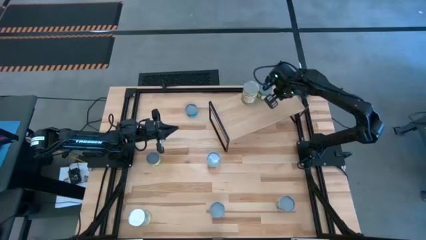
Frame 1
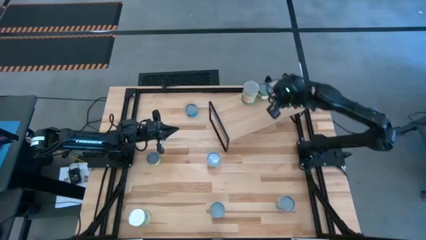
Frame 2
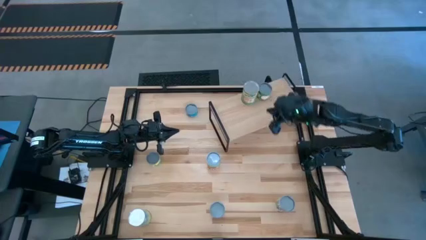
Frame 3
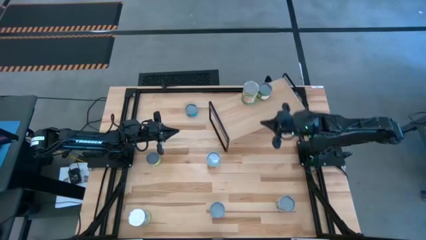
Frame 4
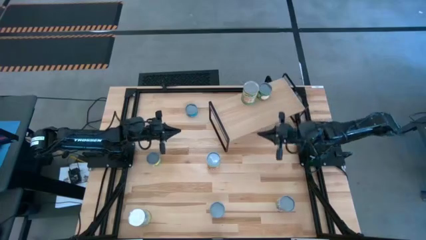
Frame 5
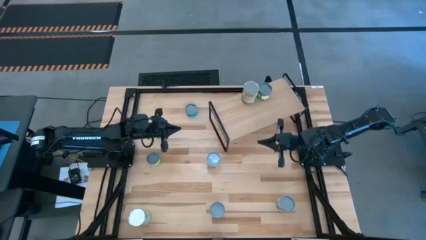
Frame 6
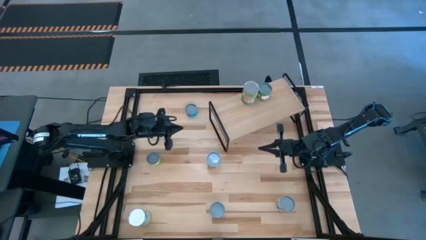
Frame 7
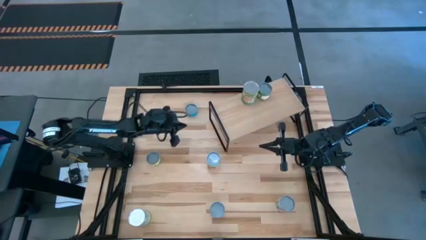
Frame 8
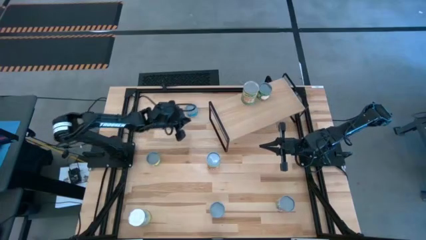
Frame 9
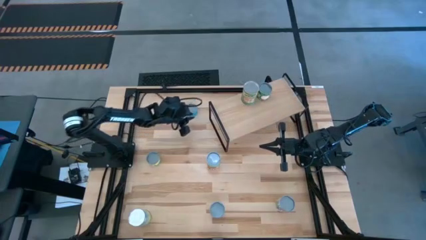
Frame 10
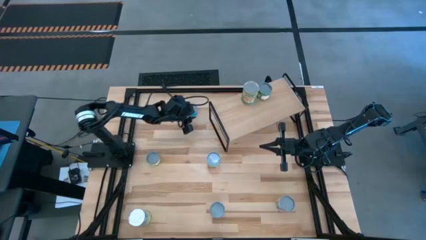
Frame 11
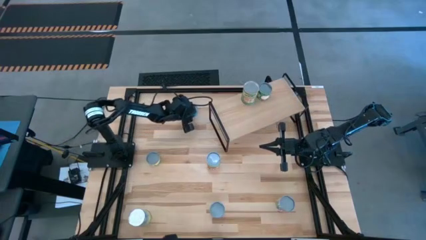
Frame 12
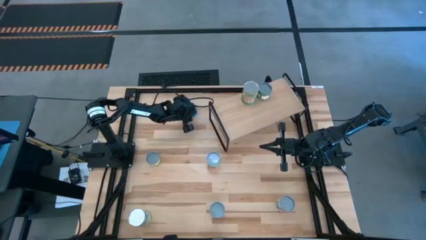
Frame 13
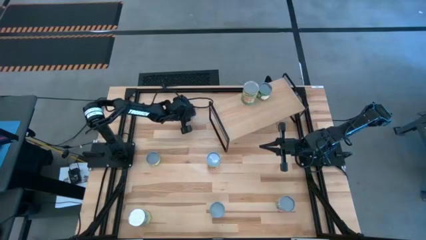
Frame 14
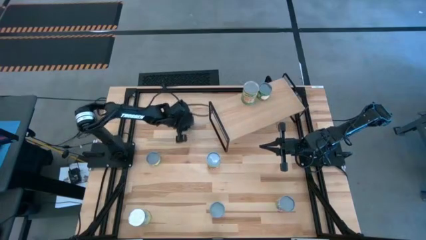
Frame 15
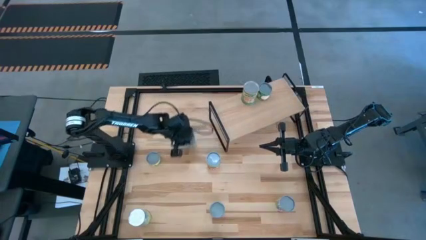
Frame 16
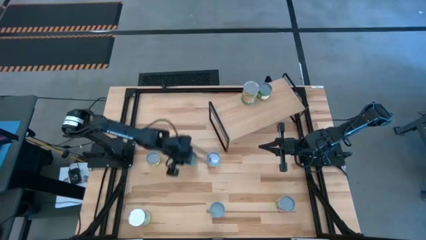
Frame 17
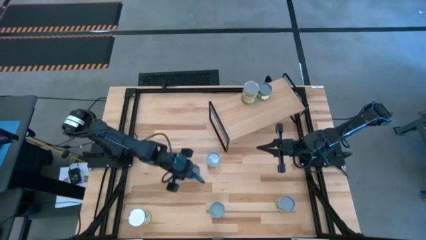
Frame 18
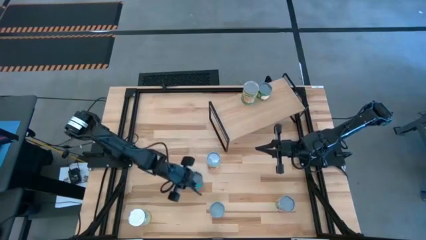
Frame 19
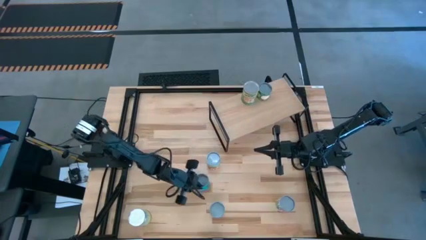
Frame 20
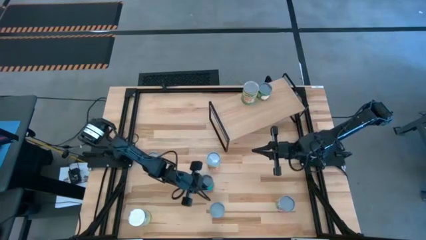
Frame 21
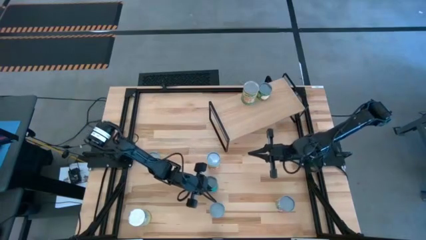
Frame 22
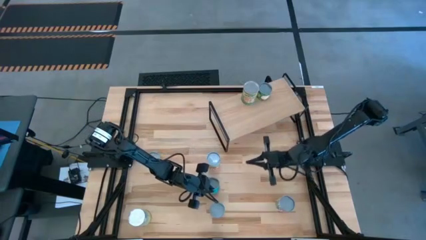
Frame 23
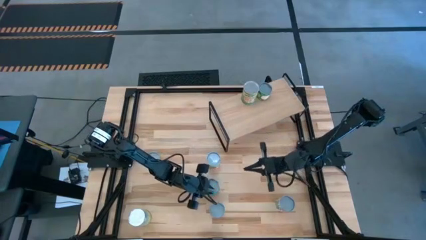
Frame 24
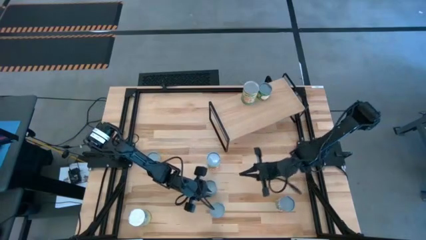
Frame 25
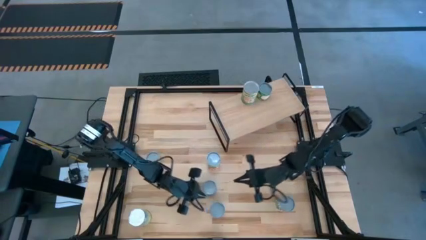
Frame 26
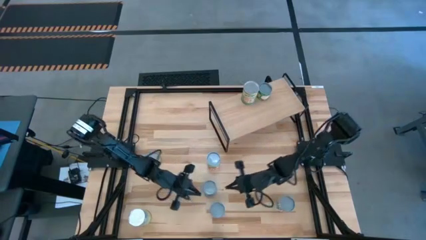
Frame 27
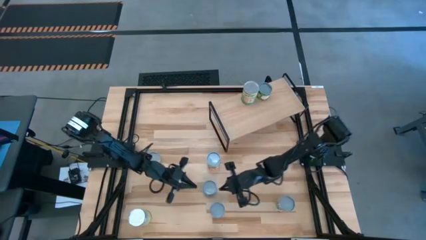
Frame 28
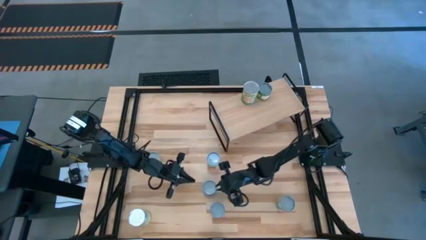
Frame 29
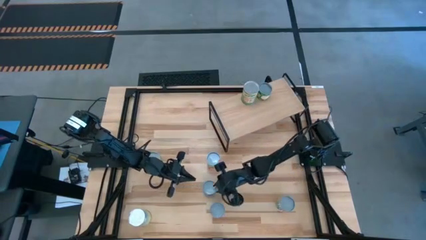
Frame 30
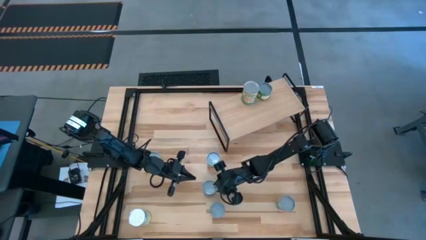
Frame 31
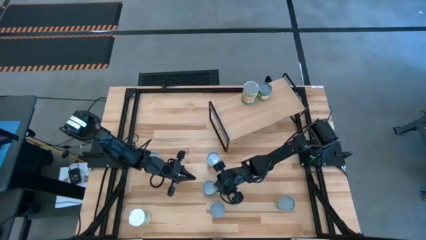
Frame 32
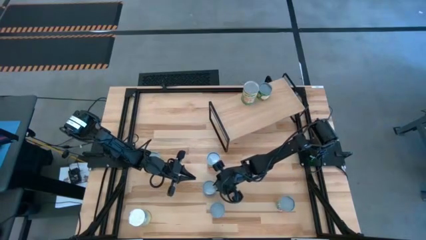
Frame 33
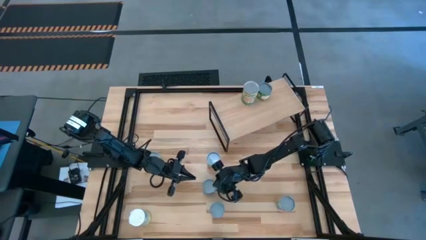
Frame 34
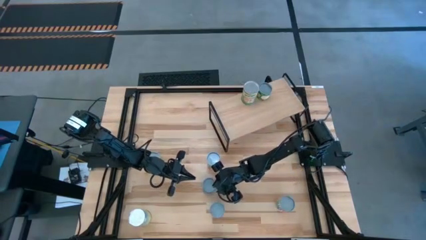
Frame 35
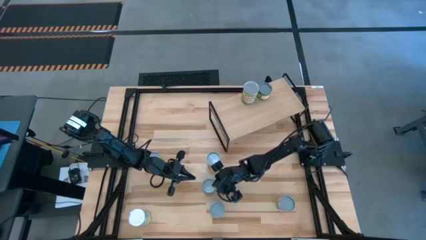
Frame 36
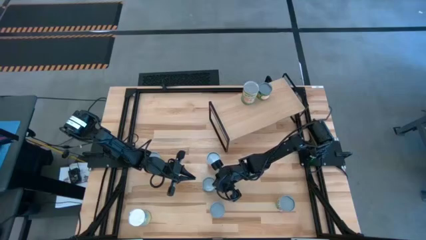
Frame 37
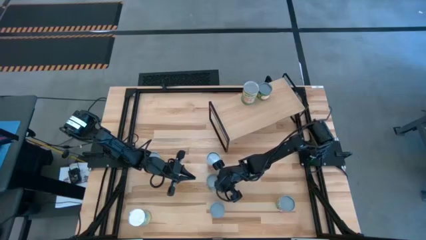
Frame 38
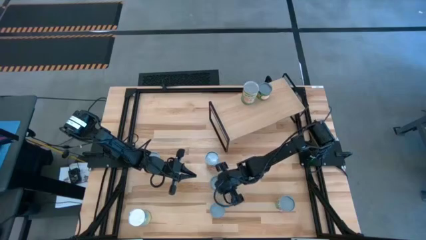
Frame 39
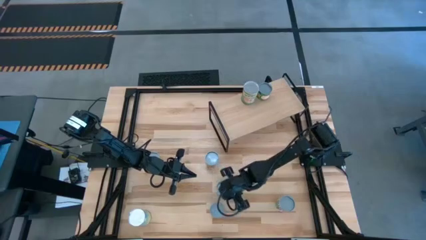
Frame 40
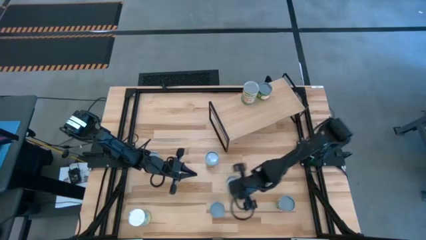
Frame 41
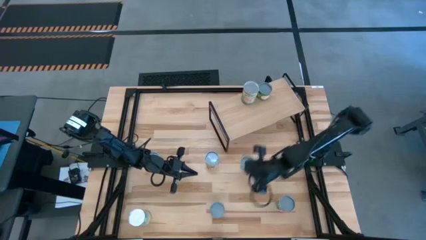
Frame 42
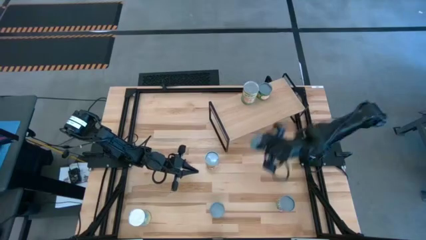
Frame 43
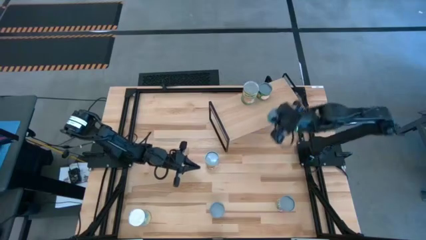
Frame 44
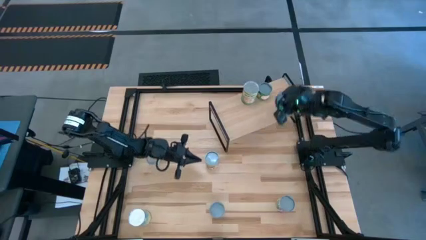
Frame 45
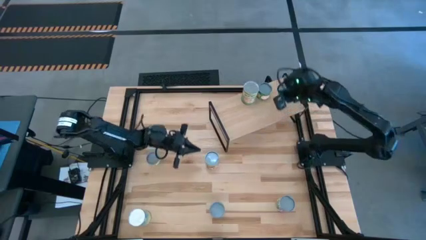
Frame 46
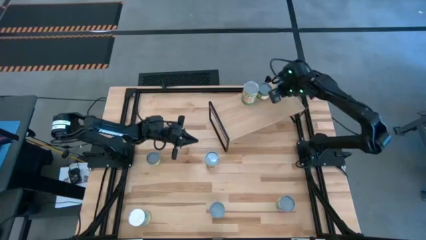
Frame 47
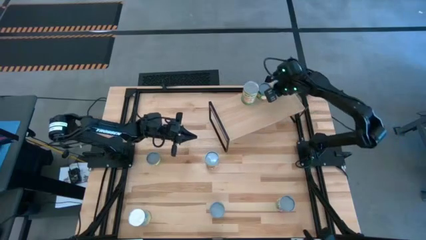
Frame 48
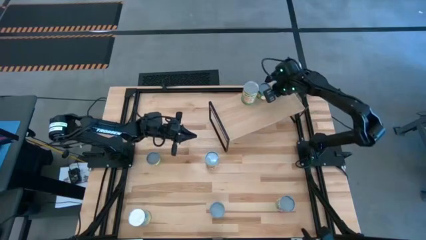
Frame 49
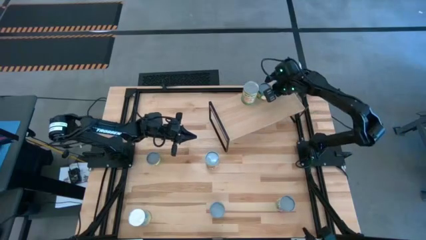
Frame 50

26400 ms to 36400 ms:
Task: Pick and place cans onto a shelf
Put the canned tuna on the shelf
